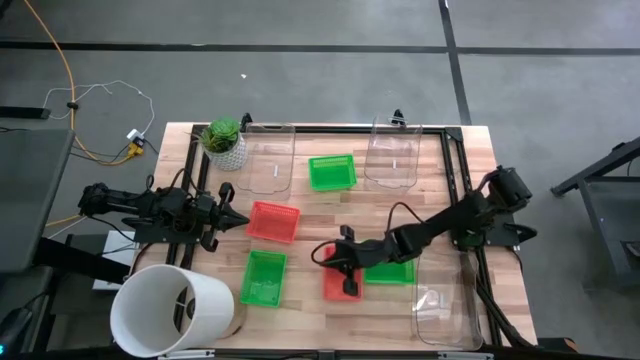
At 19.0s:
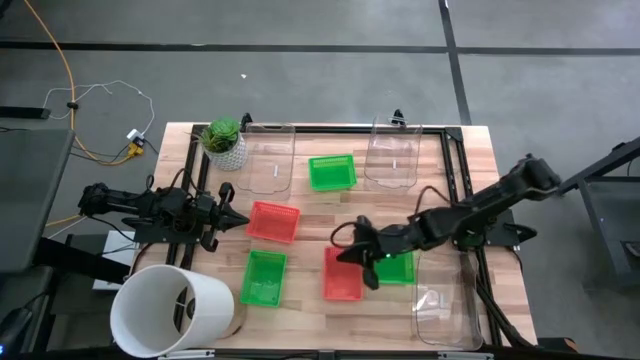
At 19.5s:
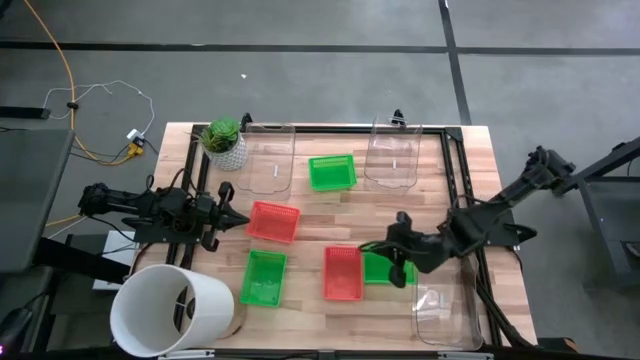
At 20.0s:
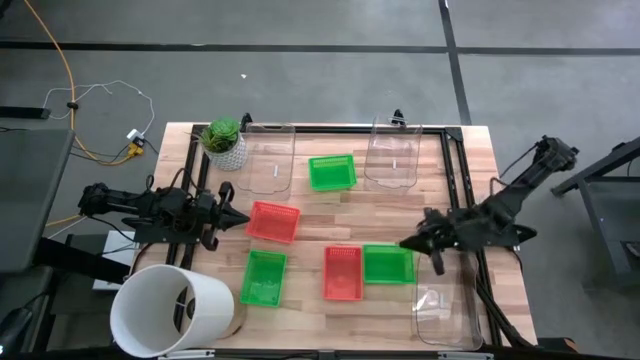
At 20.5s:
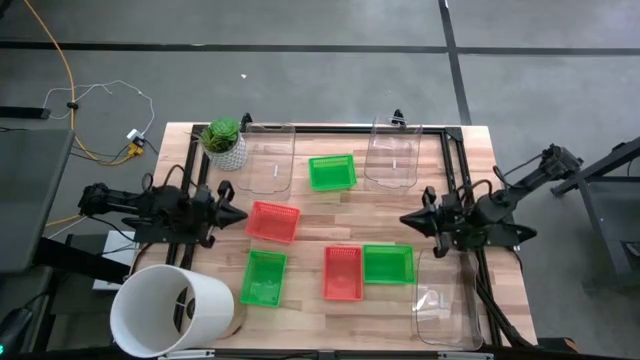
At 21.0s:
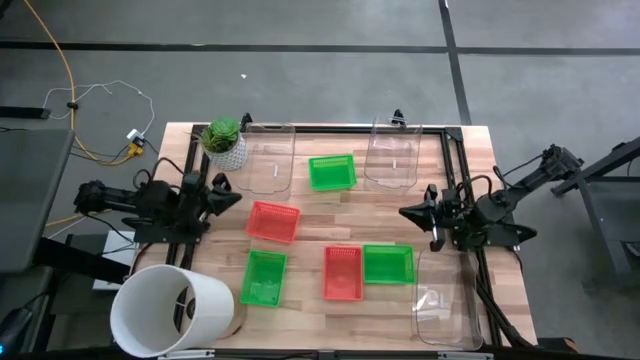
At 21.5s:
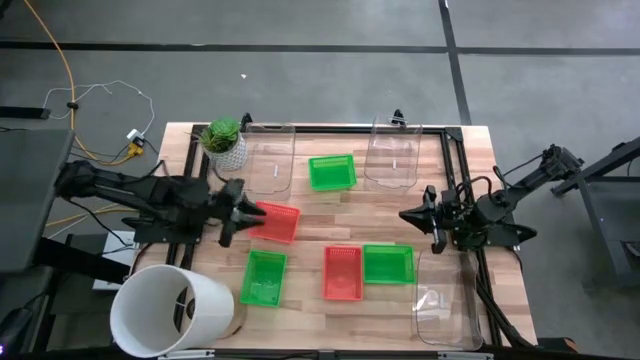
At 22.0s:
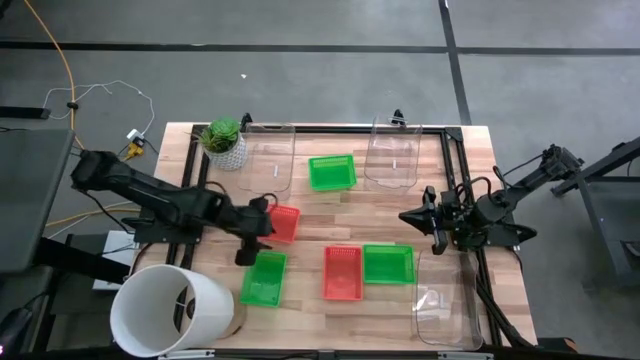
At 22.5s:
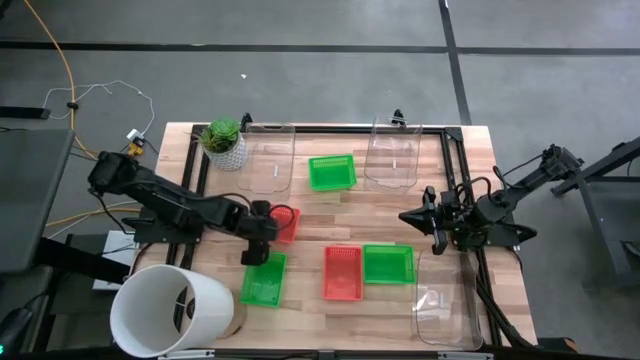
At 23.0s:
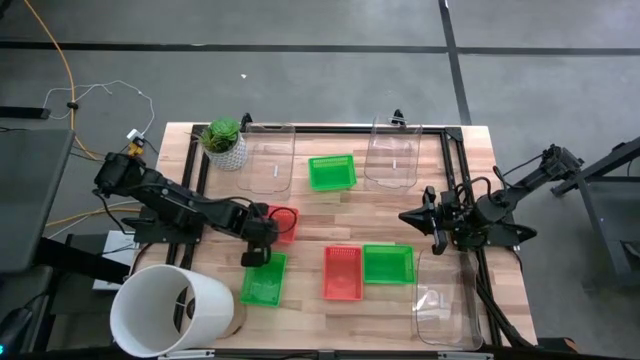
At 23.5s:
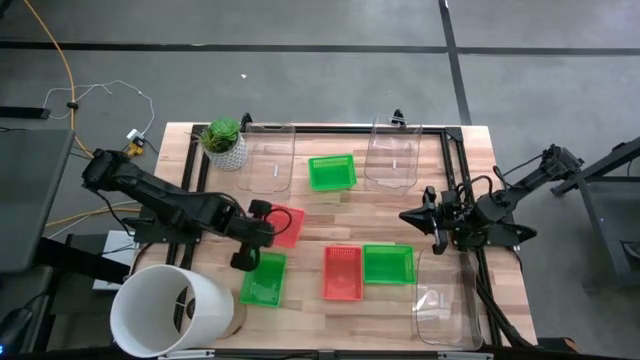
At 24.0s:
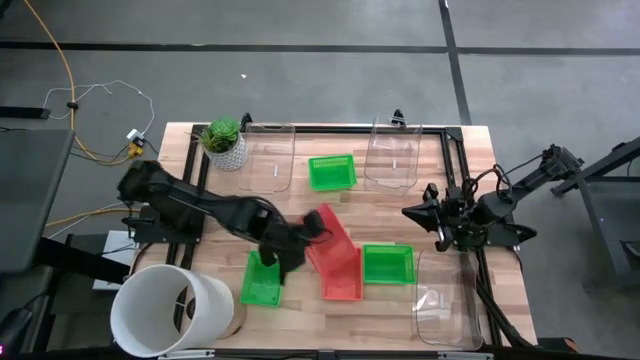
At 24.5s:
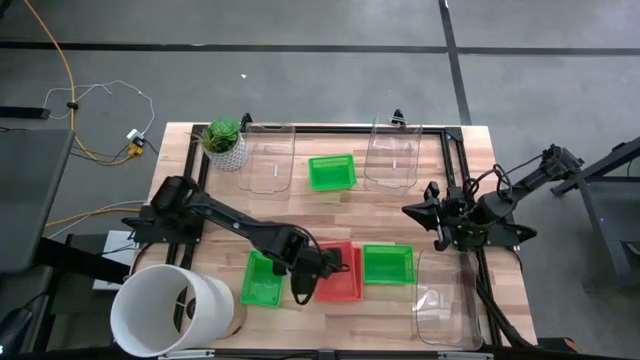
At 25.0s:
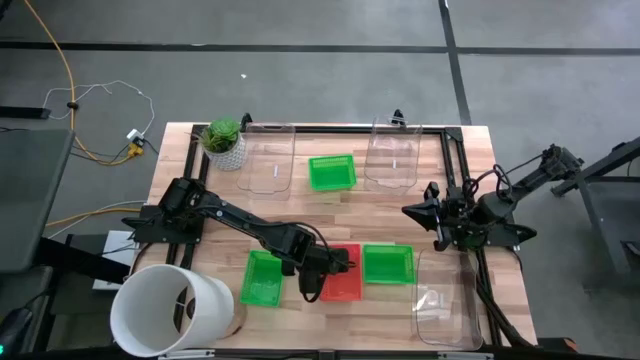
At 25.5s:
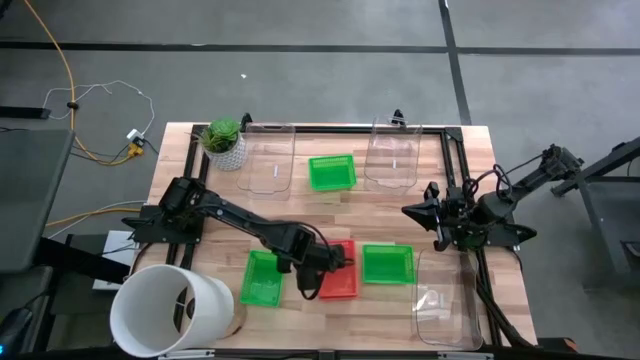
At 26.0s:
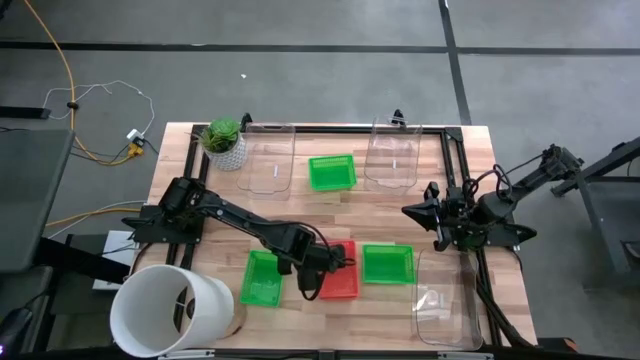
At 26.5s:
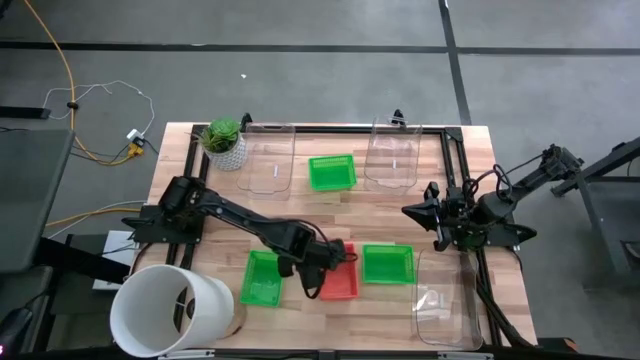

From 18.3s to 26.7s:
Stack the top orange bin on the bottom stacked orange bins

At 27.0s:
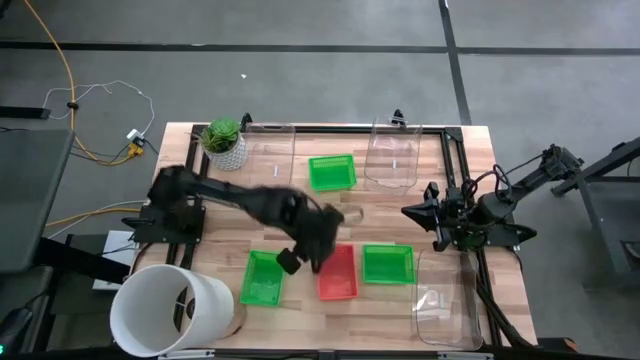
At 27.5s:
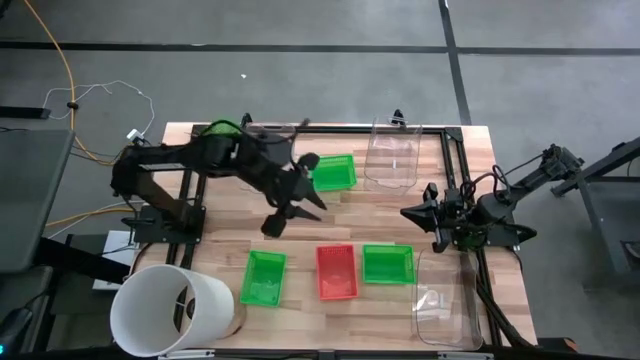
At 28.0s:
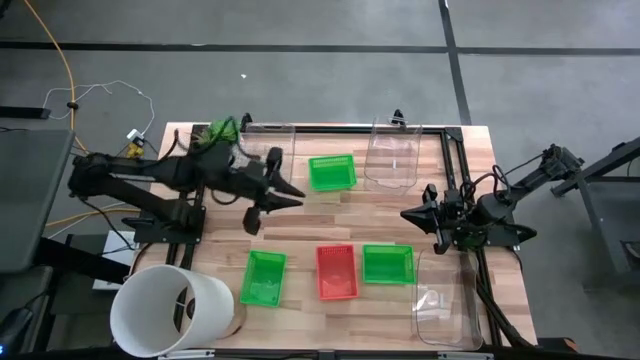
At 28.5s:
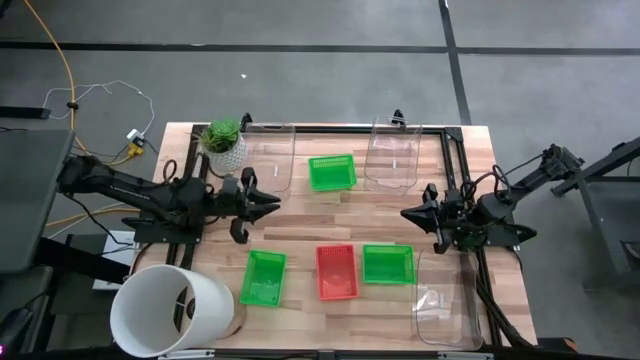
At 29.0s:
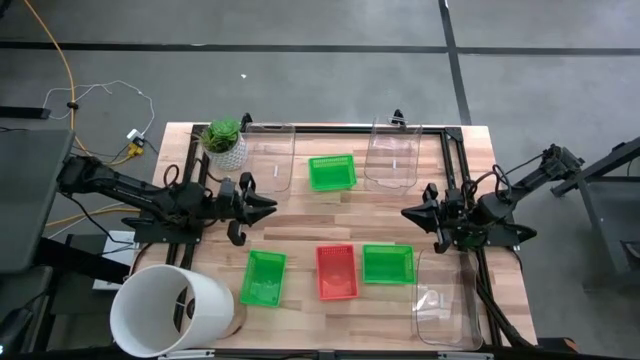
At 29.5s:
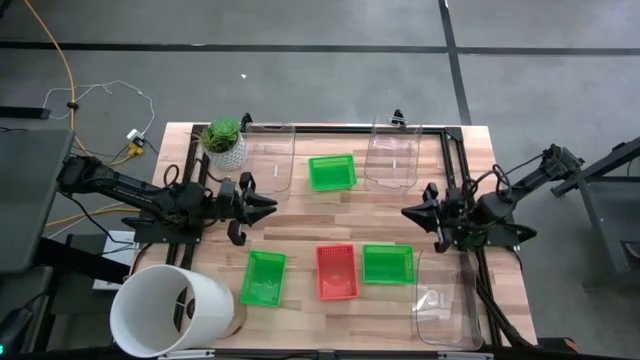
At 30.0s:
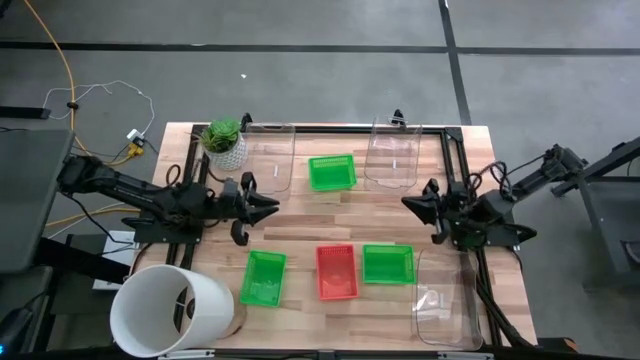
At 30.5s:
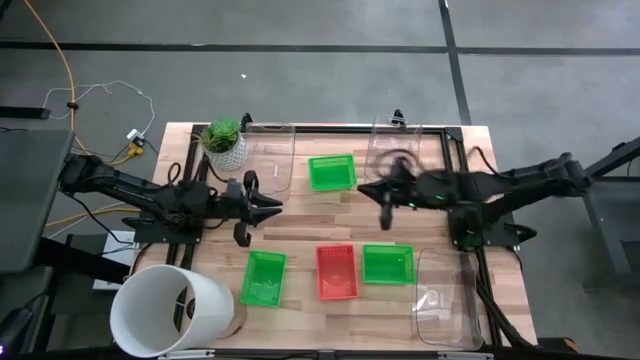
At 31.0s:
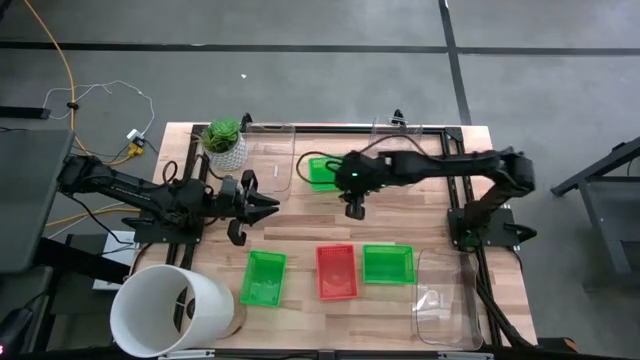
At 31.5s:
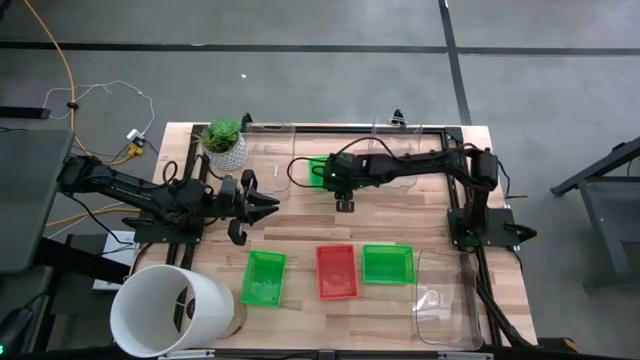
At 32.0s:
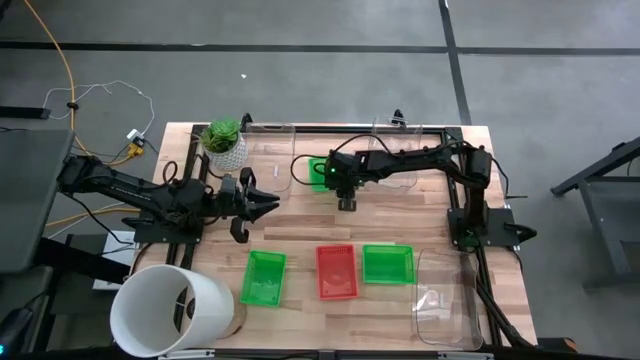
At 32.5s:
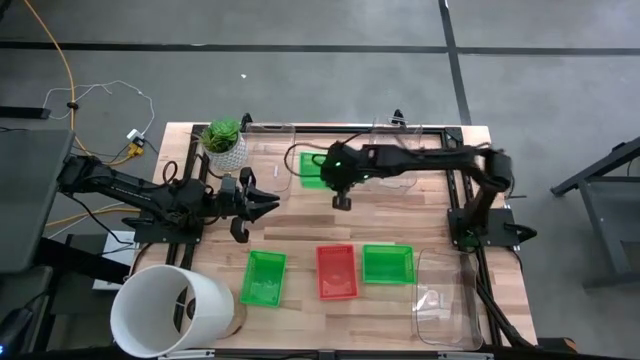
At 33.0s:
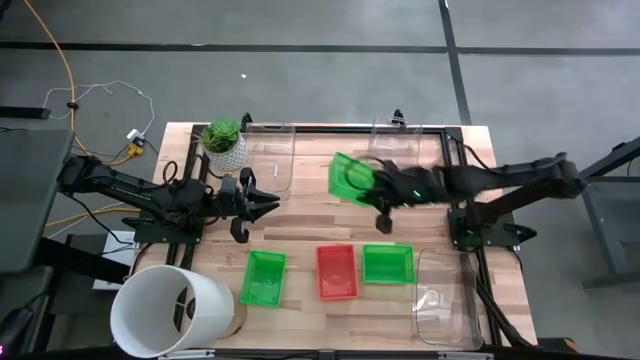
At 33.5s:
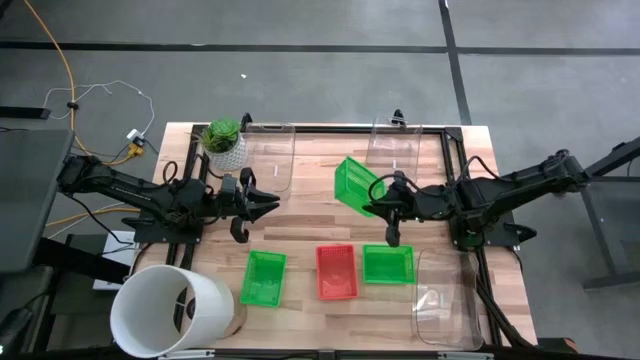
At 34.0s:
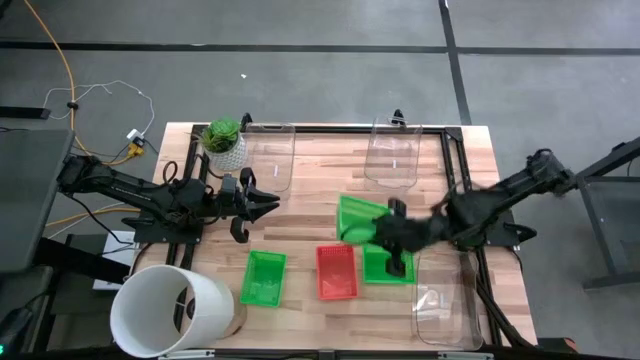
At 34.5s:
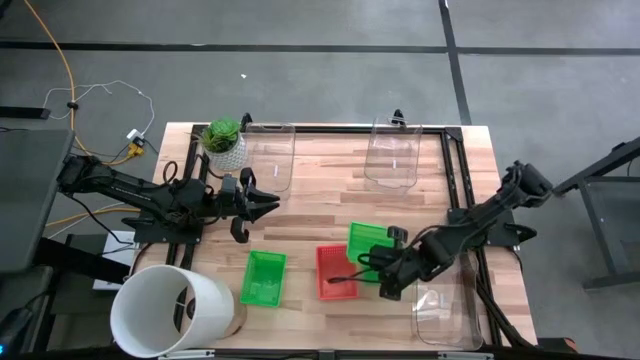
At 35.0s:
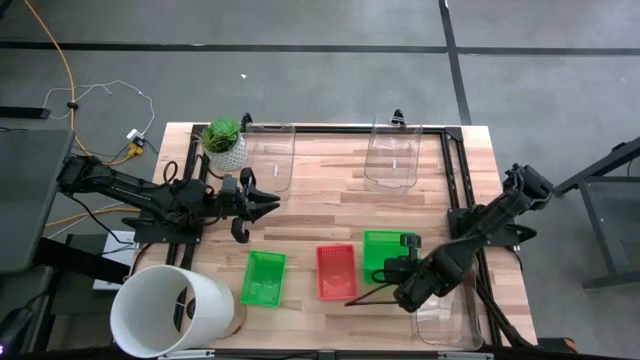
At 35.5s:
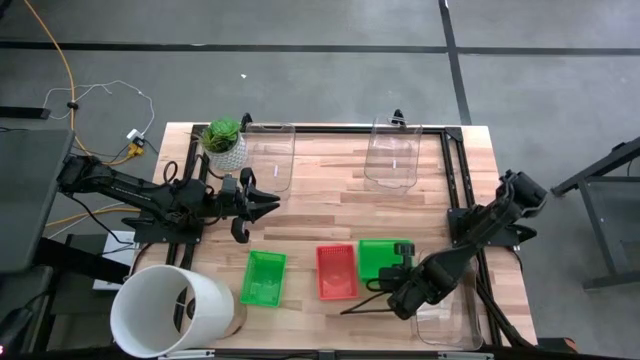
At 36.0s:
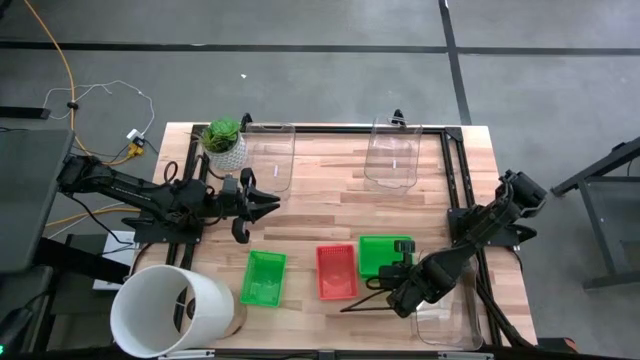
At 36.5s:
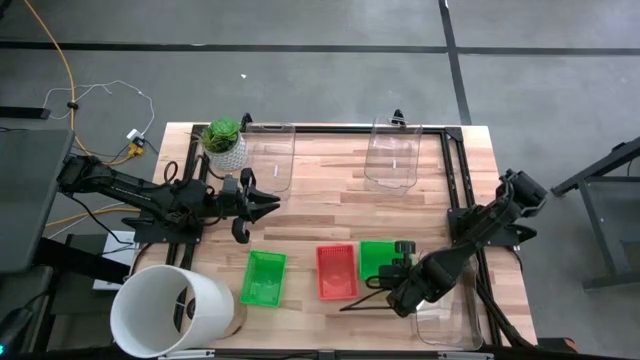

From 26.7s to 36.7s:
Stack the top center green bin on the bottom right green bin
